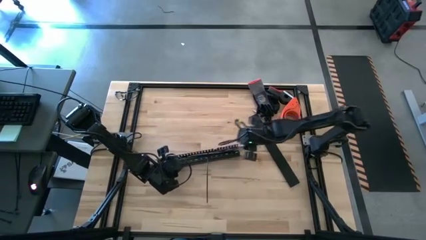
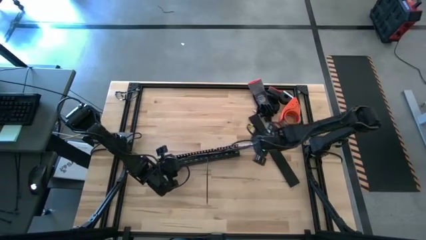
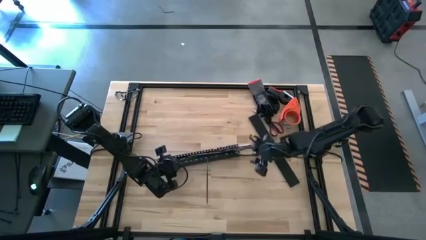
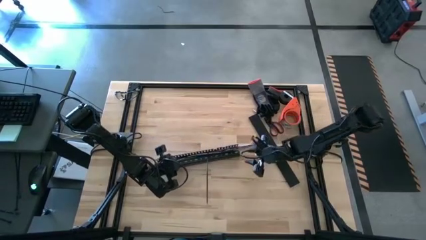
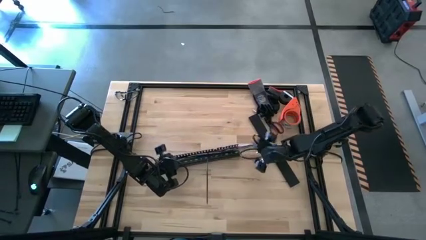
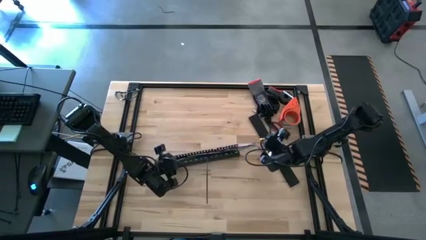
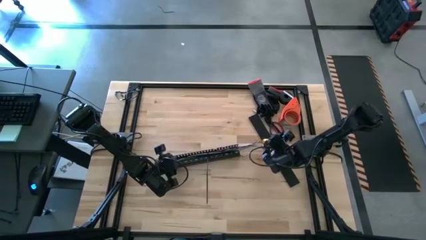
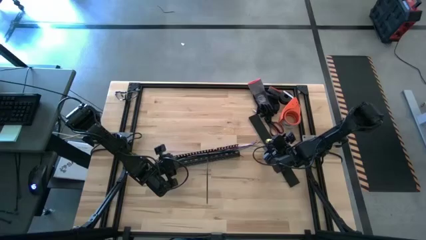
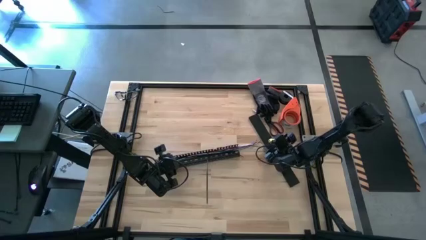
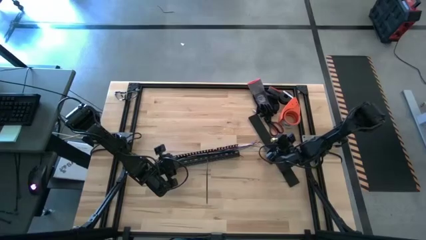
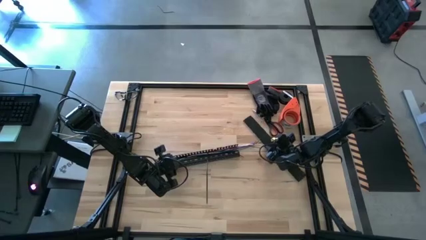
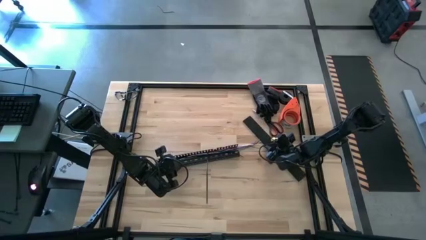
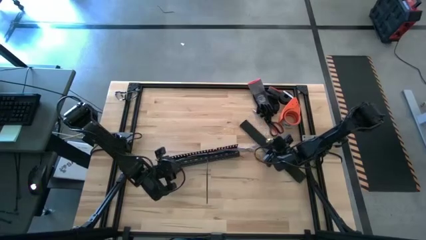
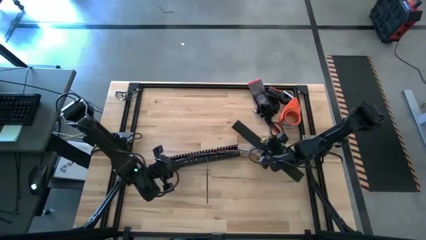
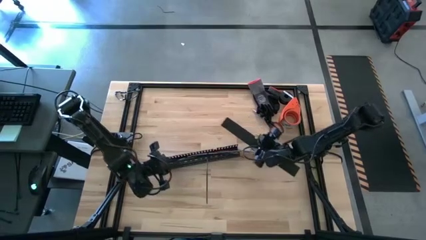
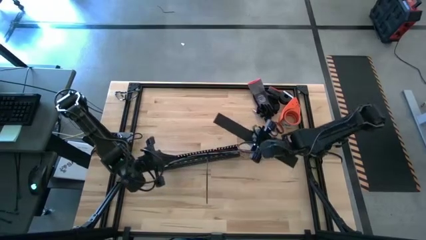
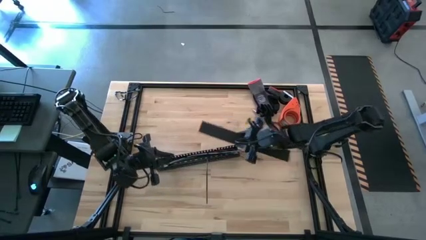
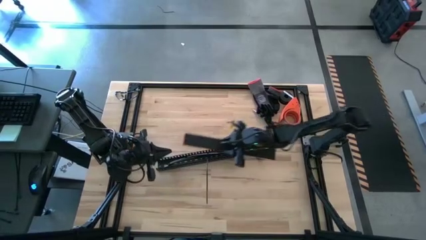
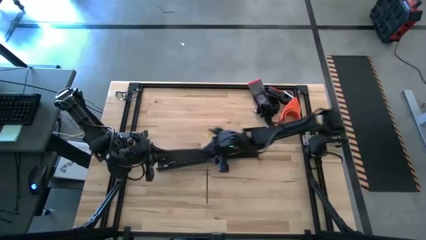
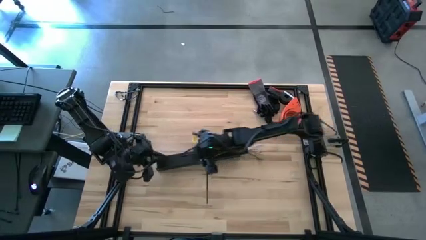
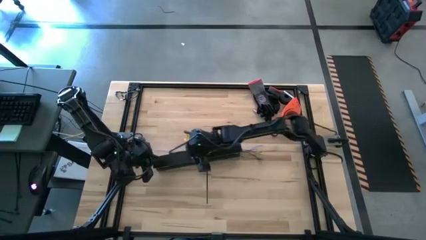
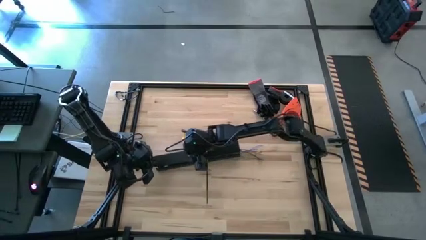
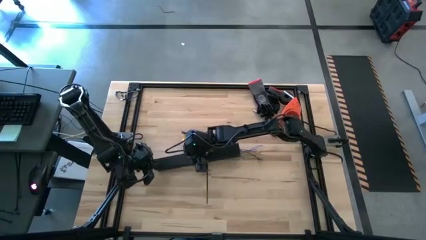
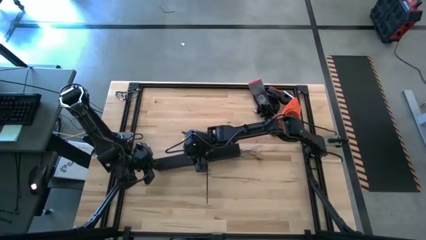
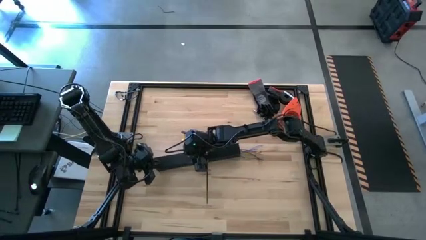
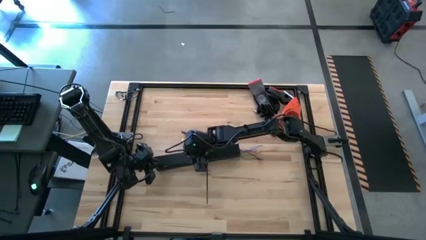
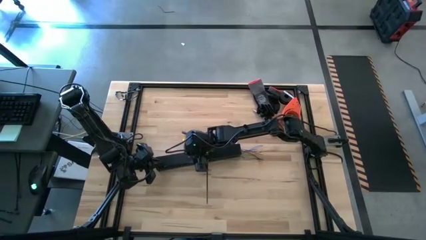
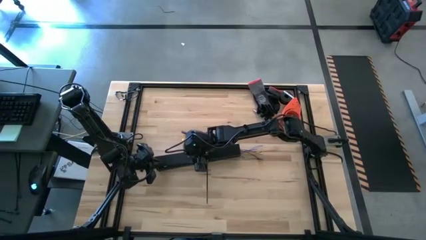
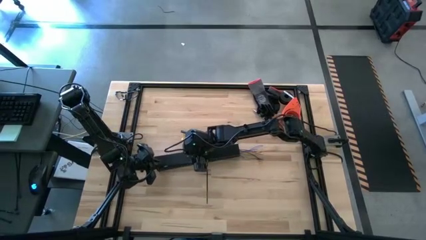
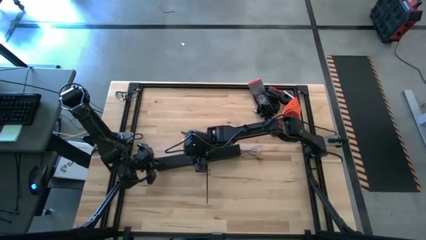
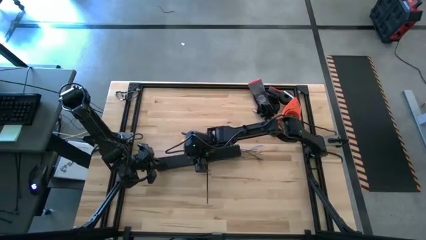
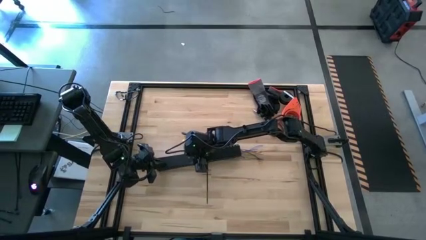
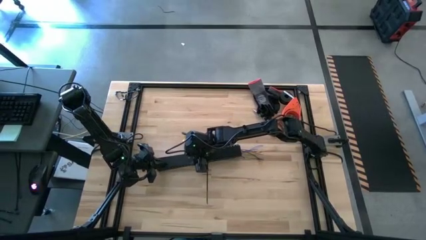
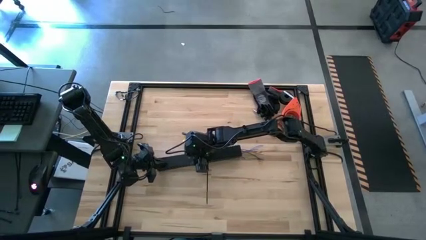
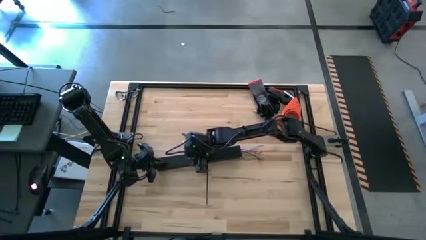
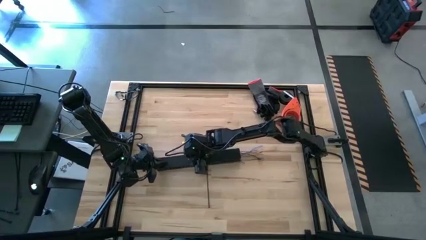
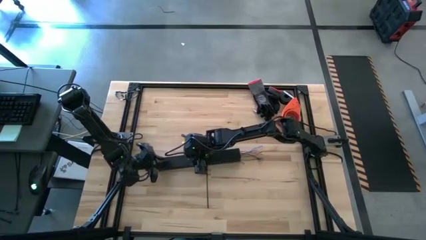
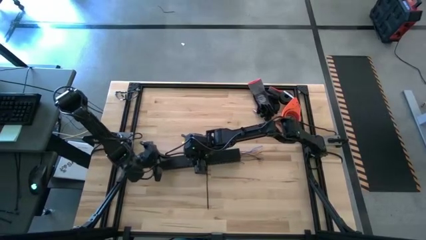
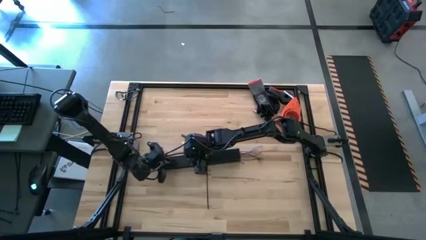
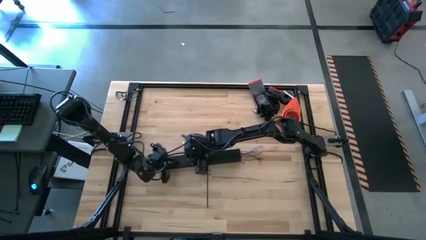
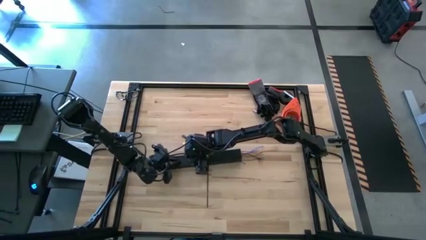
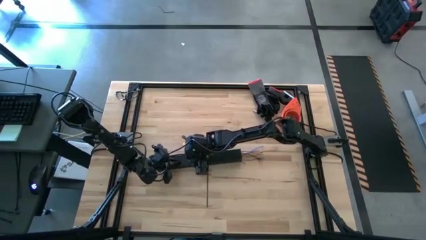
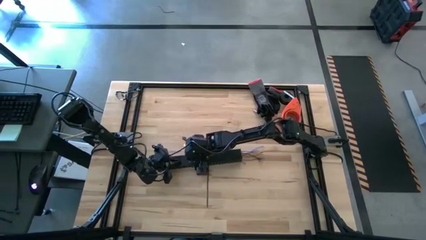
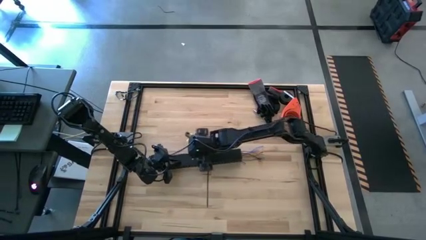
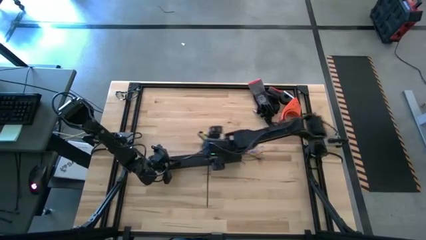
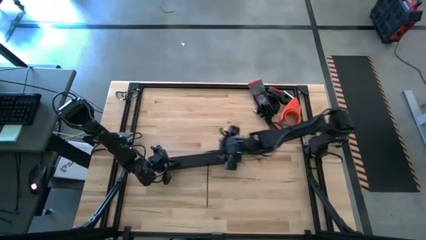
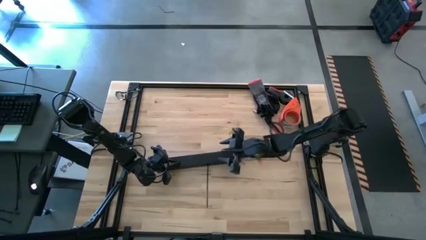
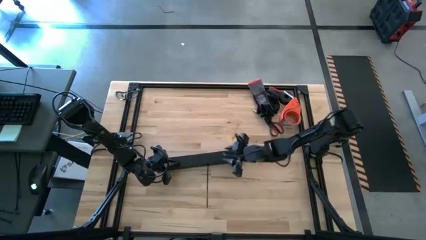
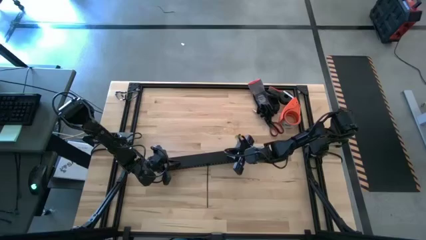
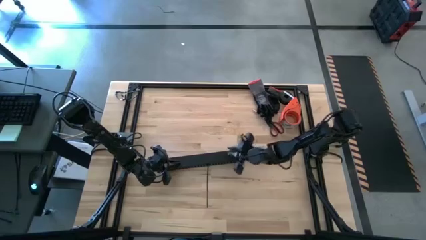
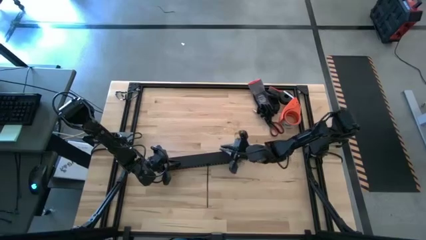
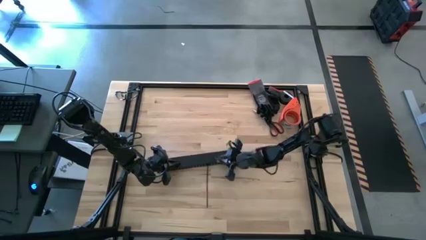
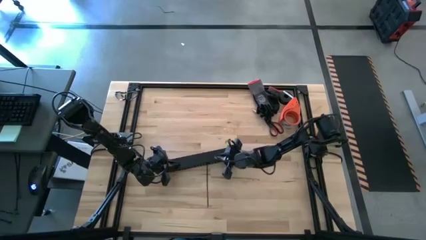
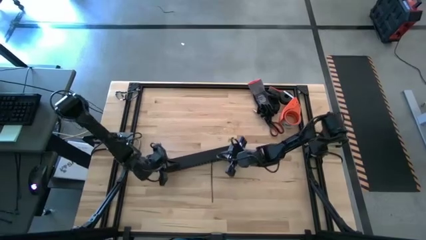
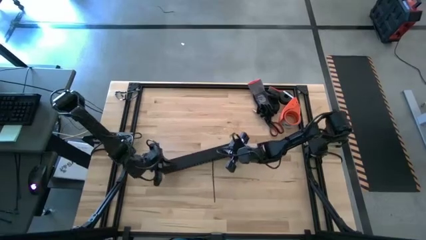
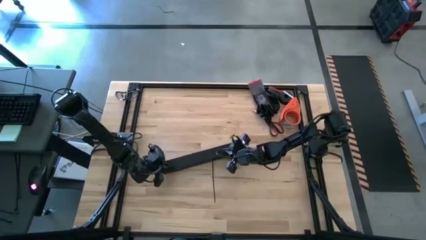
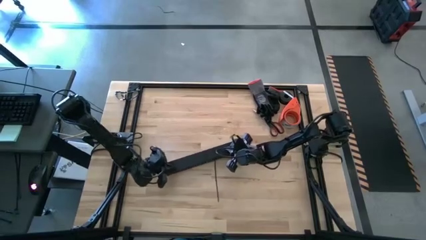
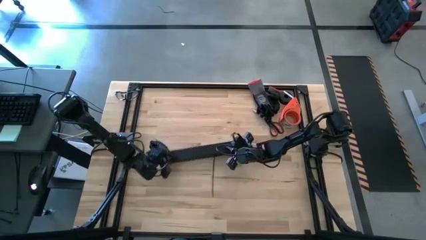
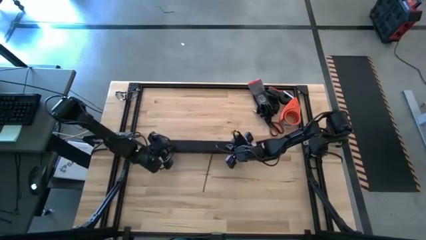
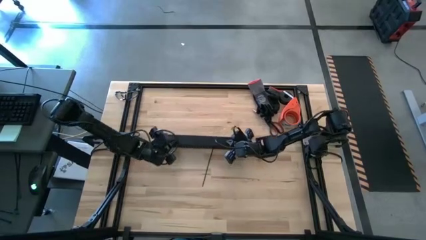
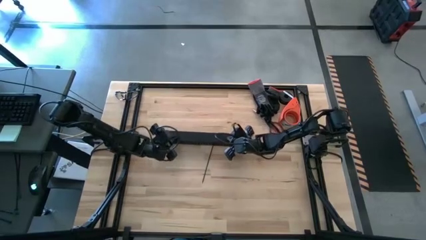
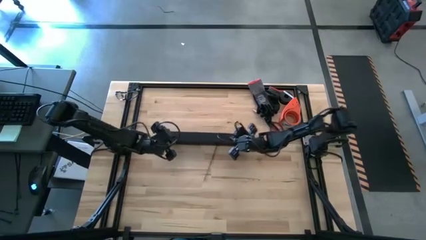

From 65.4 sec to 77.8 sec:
Task: Ziptie cables
Close the black cable duct with the black duct lid
